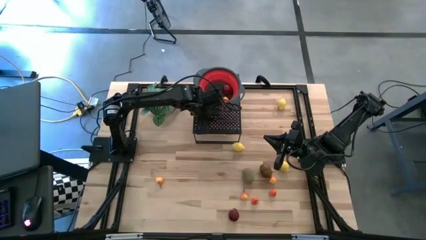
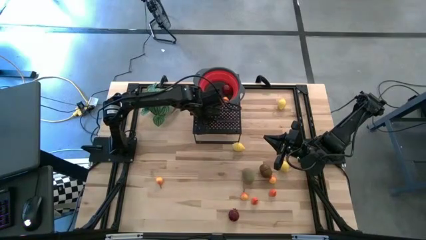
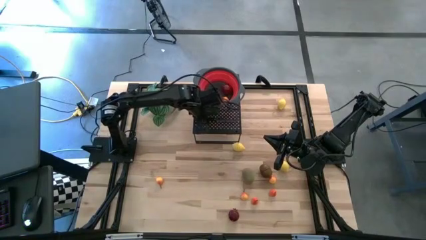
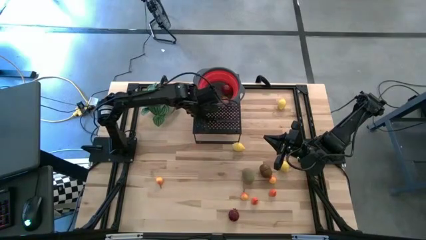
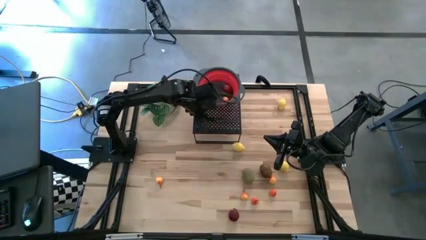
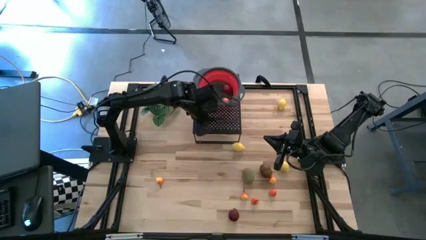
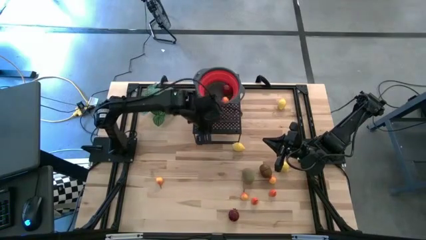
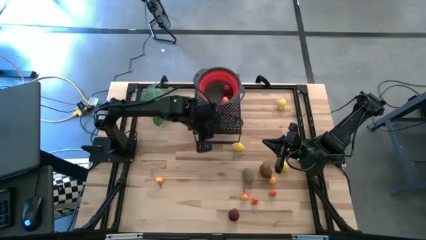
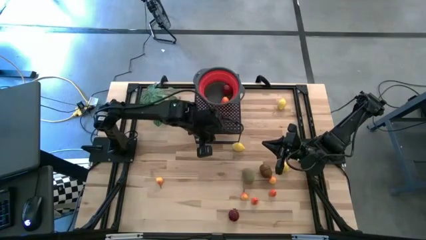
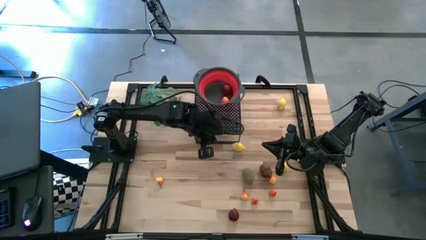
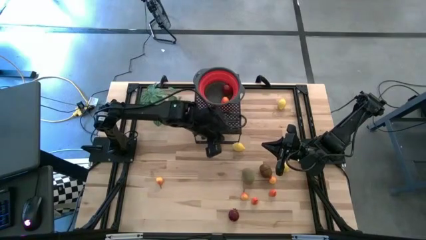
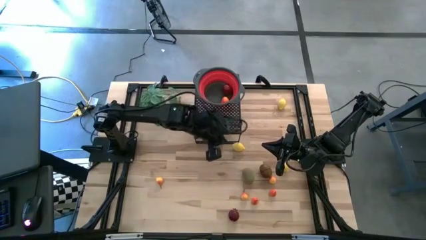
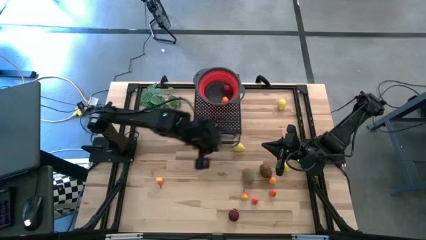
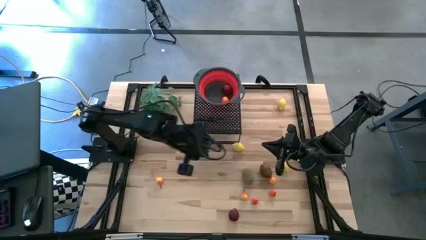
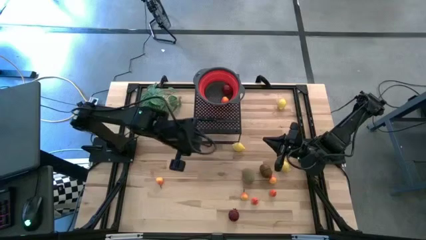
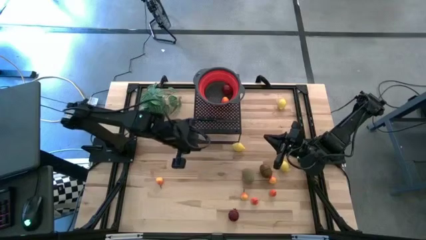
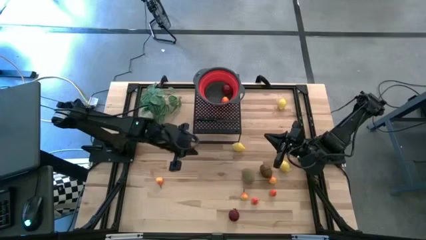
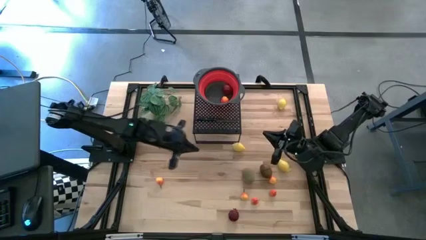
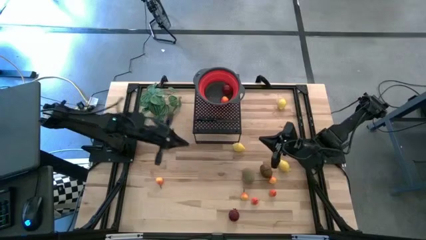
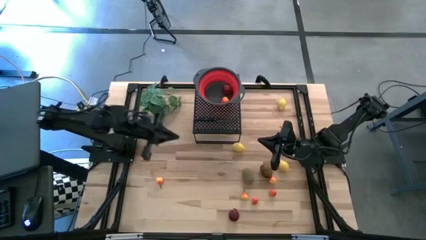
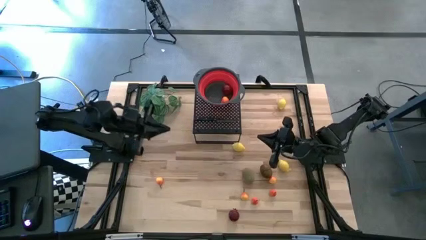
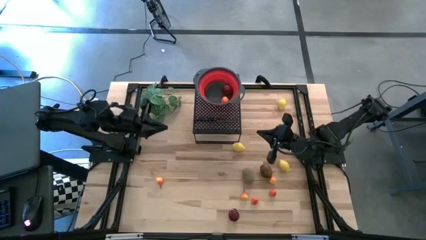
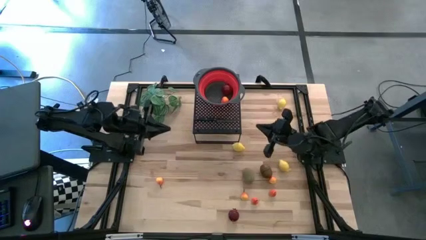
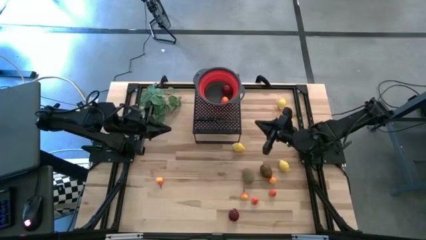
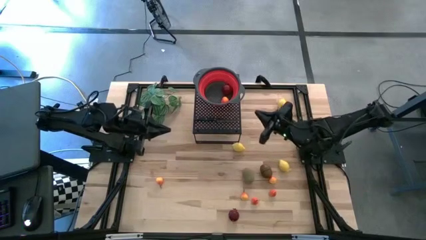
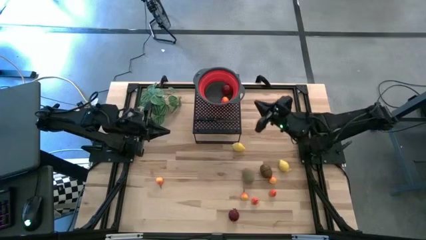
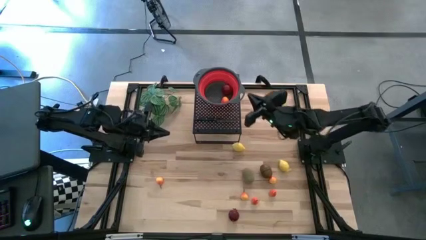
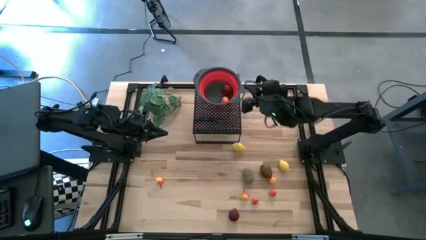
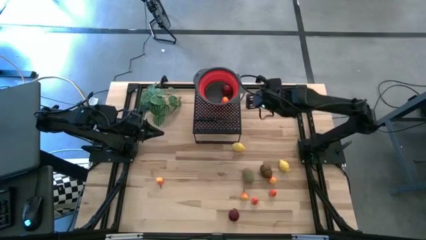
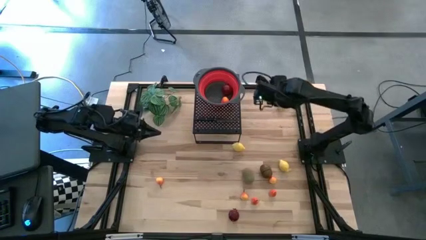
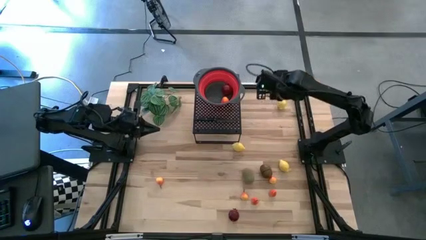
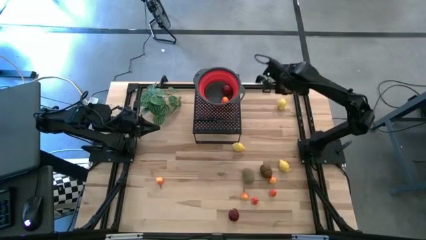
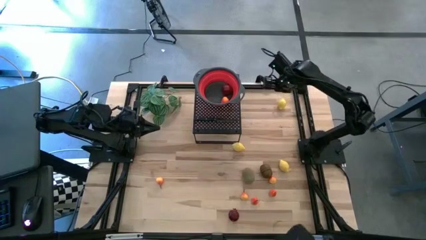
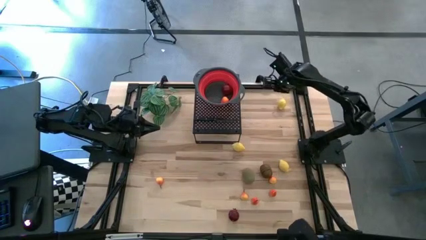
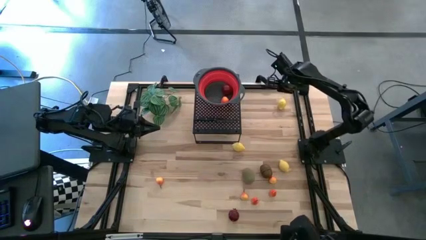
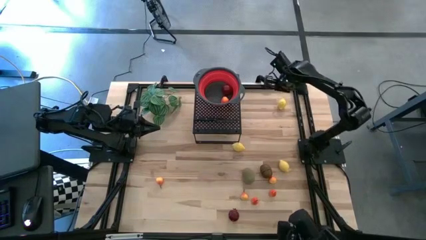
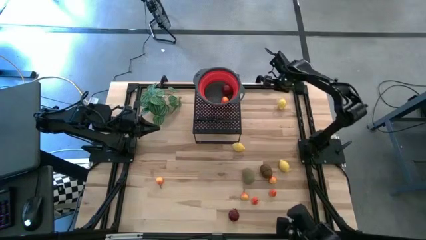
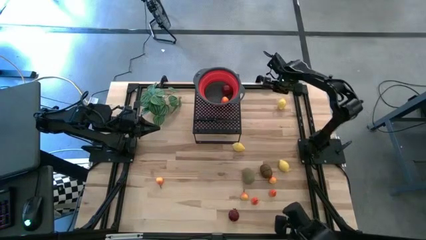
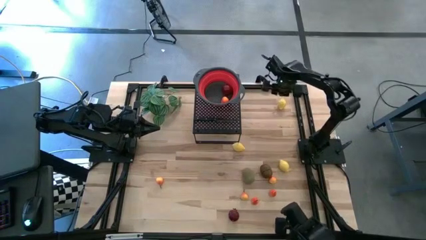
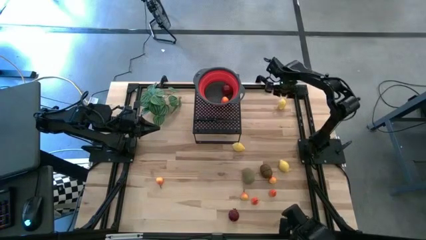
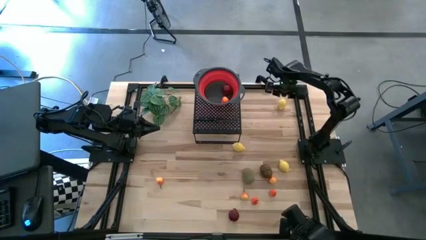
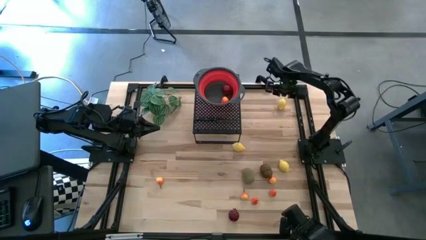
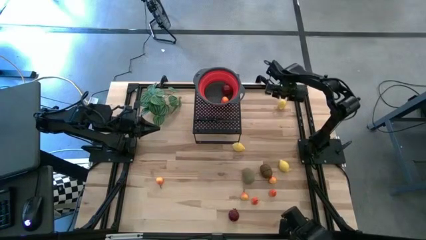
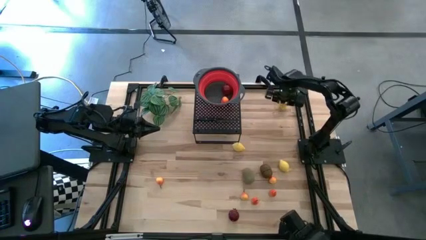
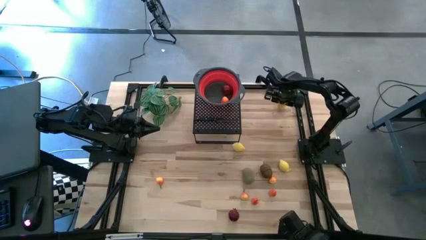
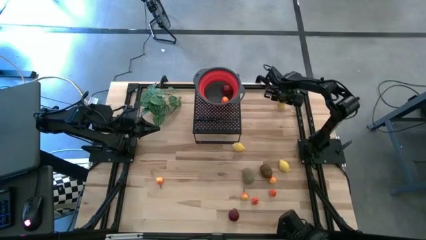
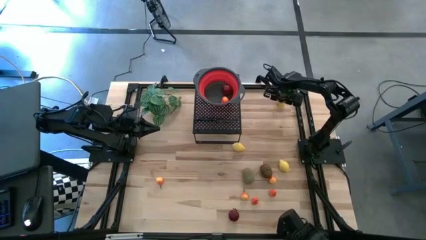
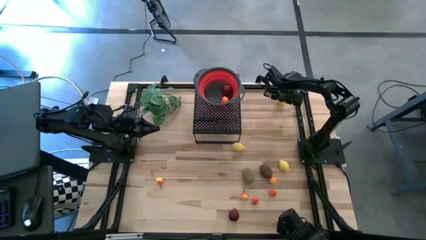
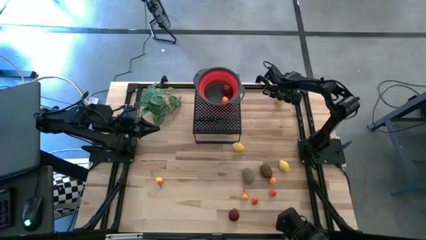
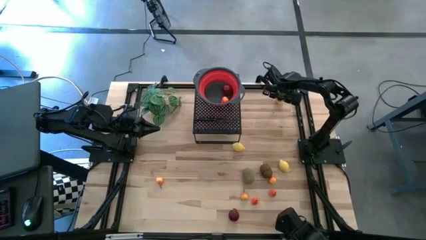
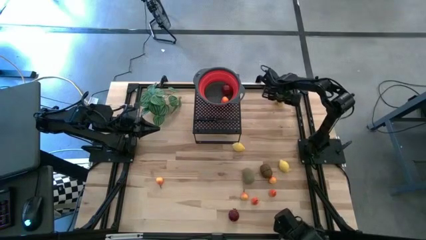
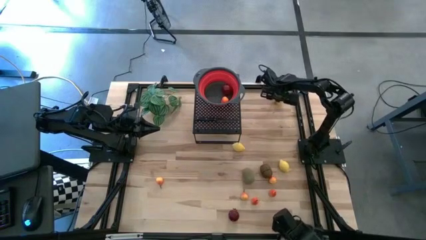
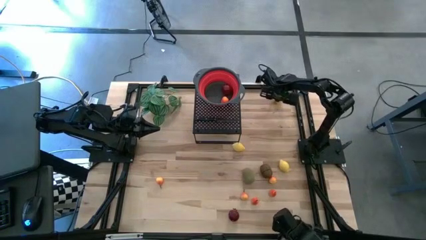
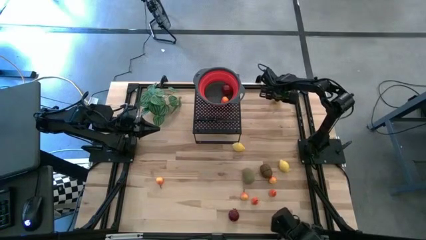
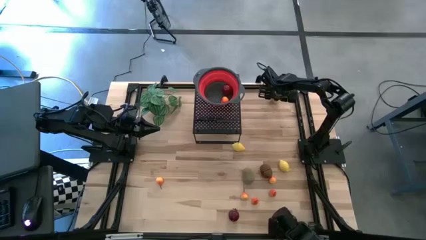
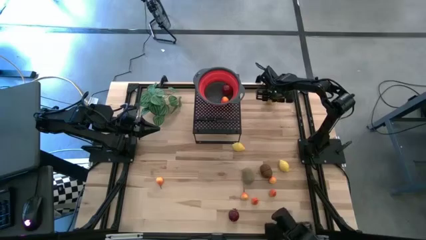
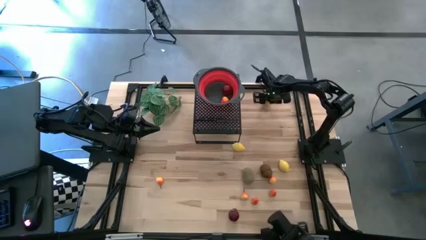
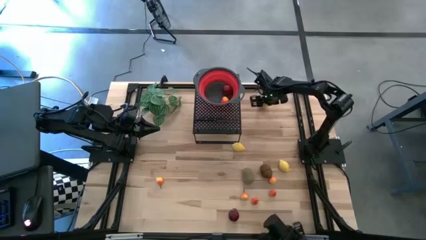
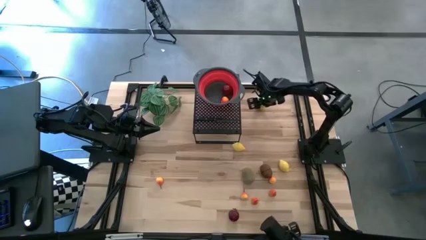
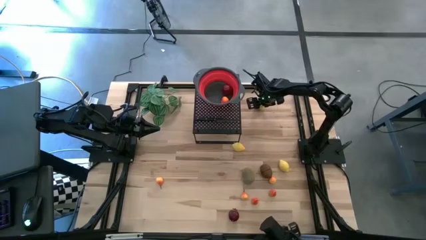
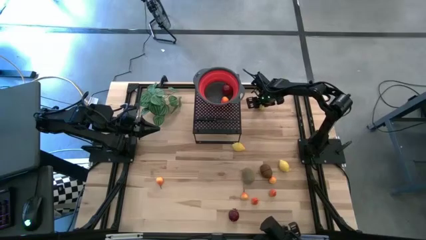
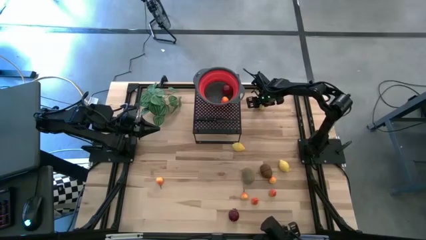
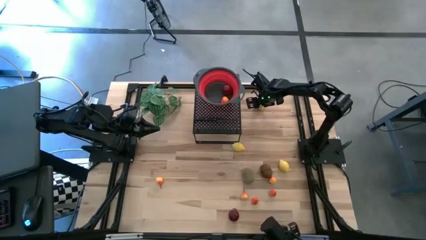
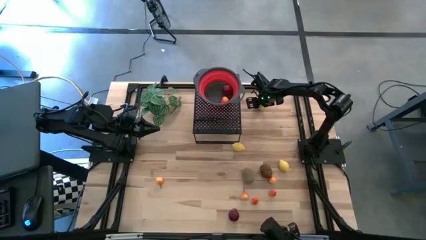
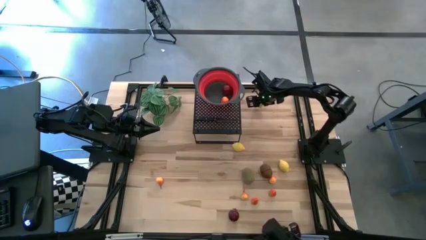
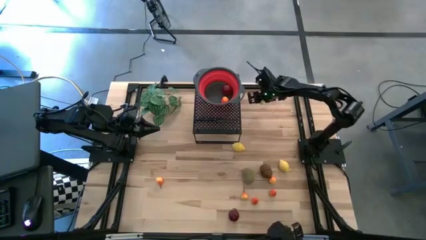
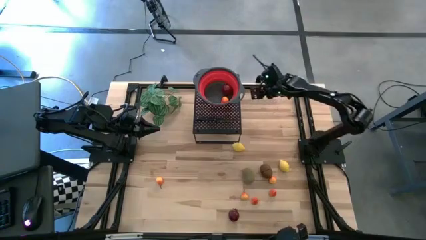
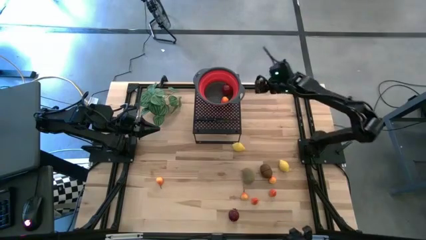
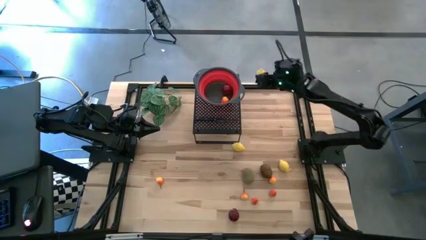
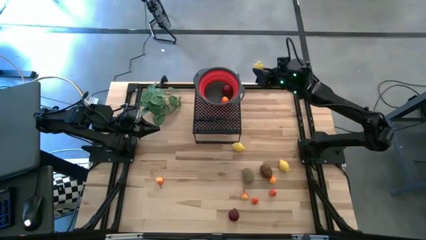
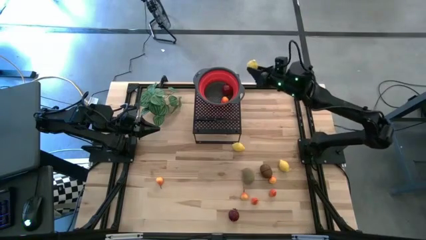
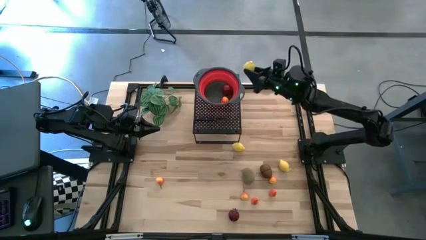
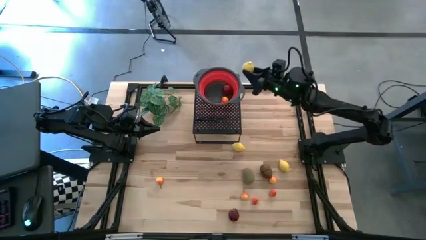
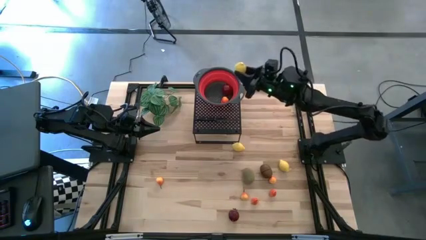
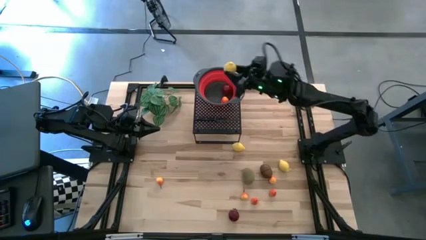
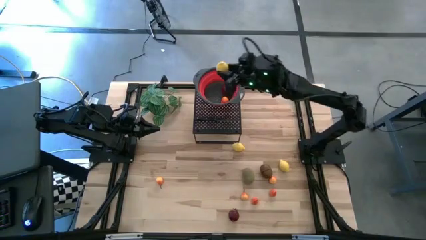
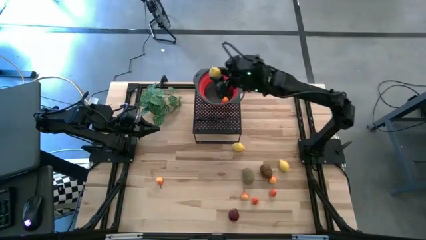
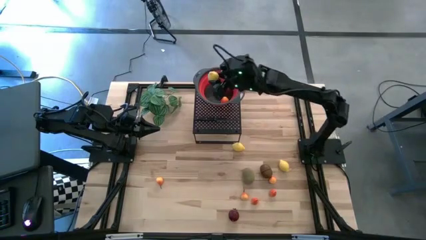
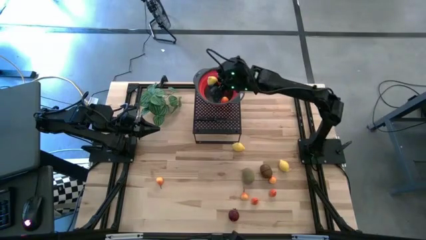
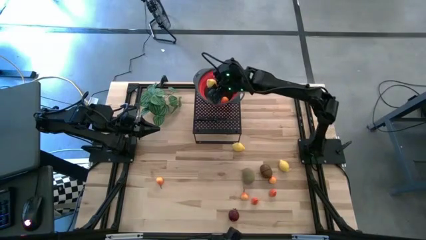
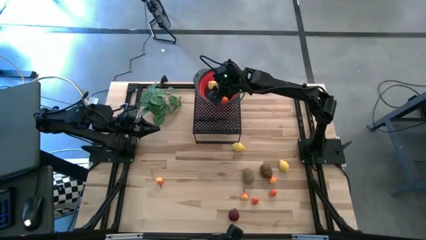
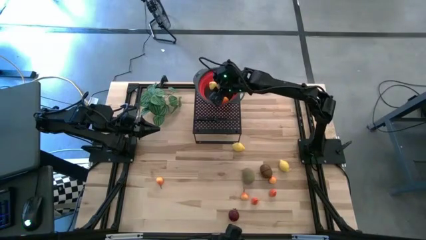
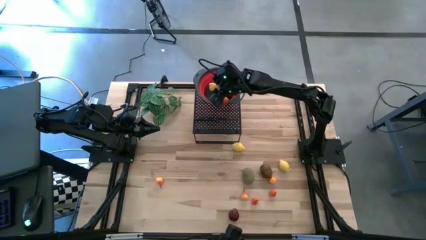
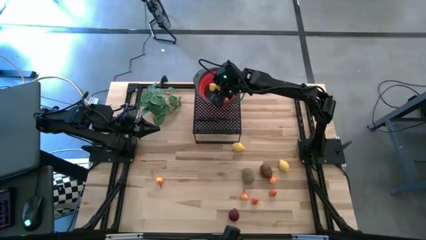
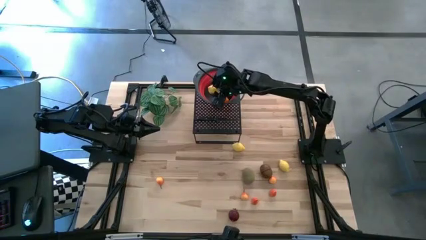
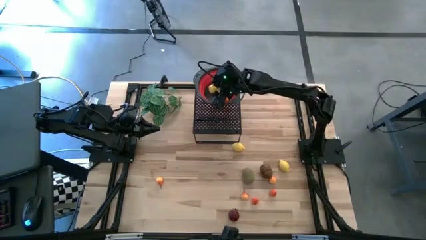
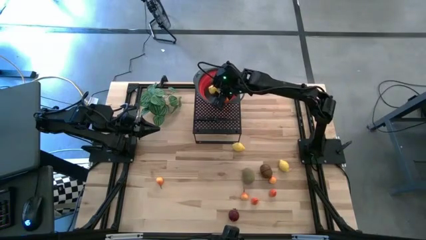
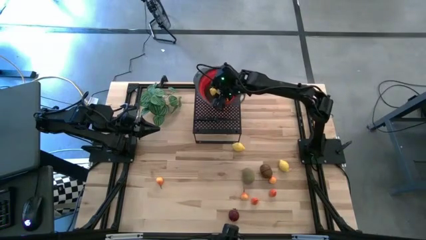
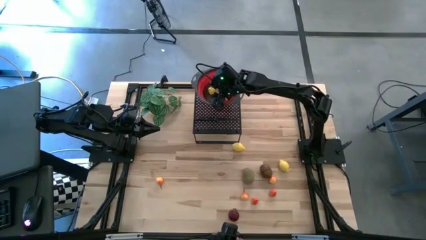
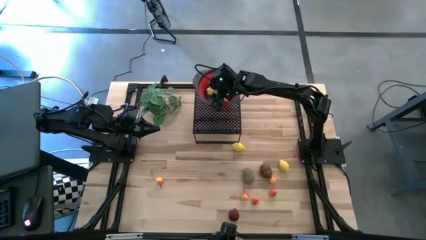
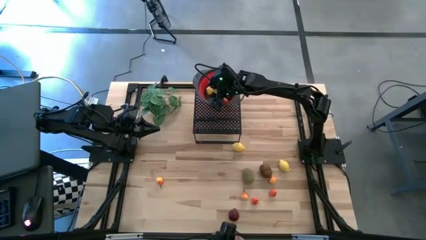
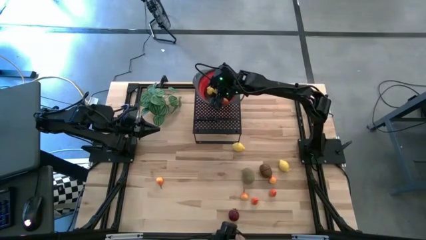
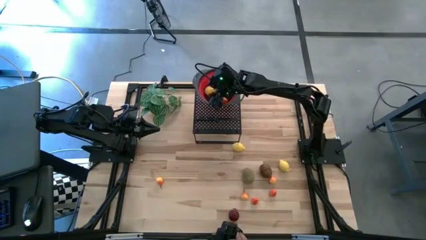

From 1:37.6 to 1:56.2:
Task: Pick & Place Fruit
Put the top lemon into the red strainer bowl
